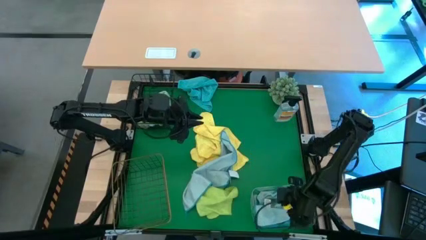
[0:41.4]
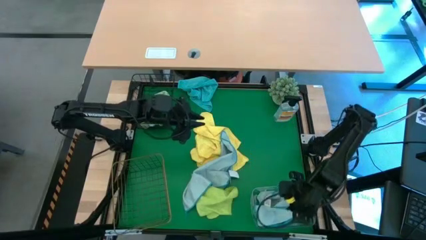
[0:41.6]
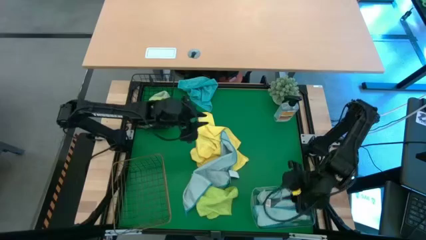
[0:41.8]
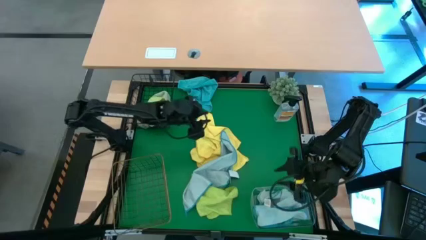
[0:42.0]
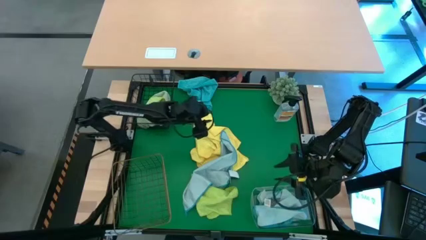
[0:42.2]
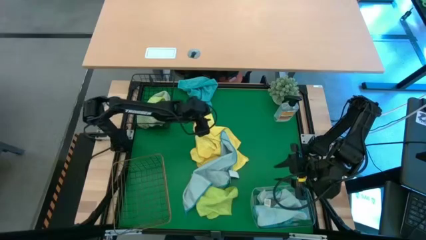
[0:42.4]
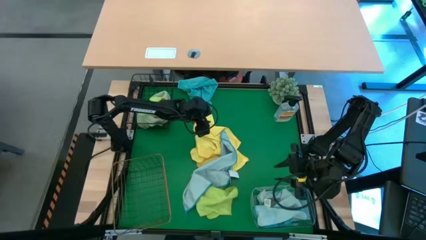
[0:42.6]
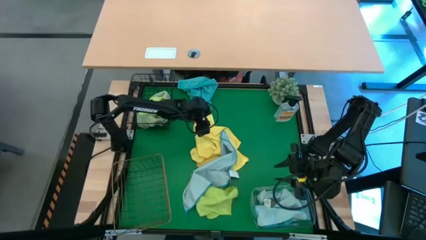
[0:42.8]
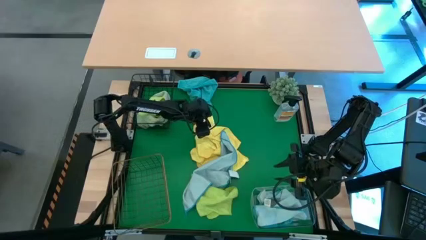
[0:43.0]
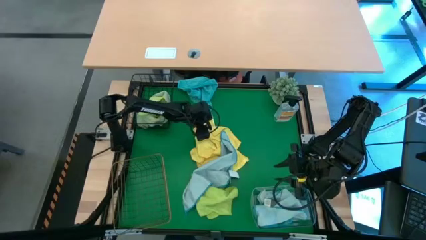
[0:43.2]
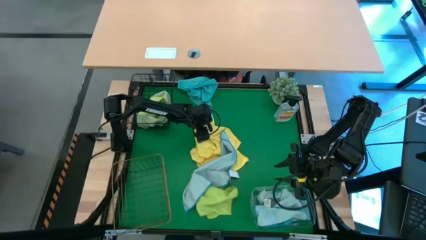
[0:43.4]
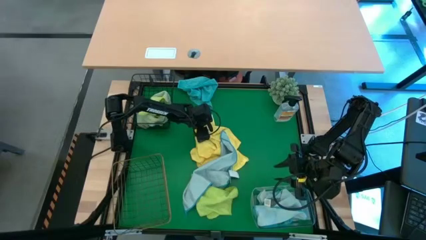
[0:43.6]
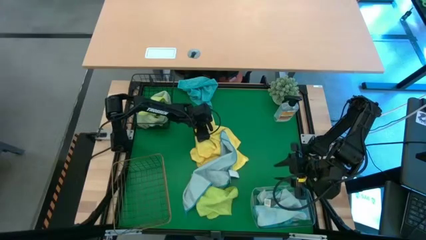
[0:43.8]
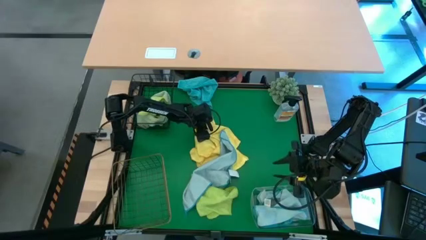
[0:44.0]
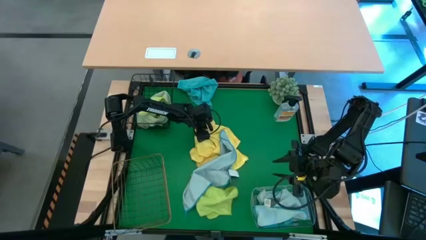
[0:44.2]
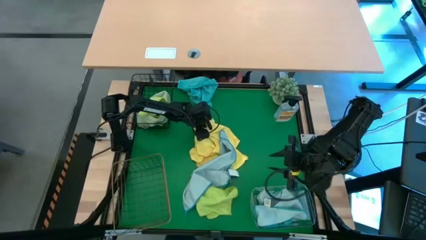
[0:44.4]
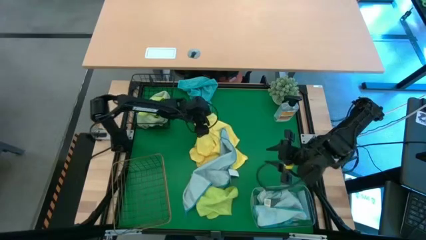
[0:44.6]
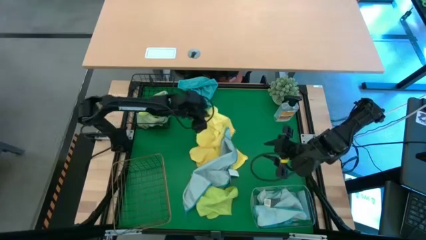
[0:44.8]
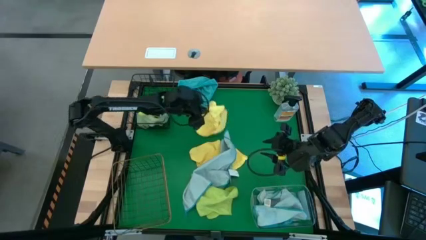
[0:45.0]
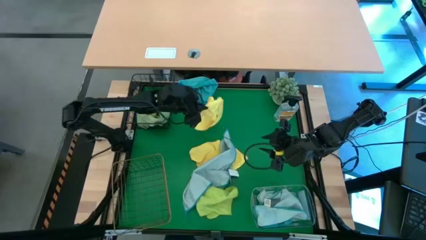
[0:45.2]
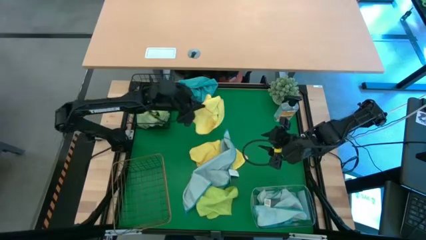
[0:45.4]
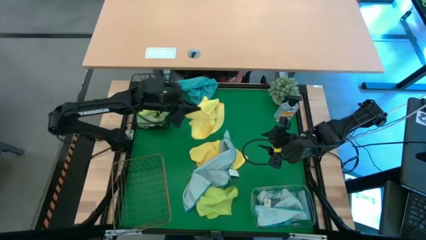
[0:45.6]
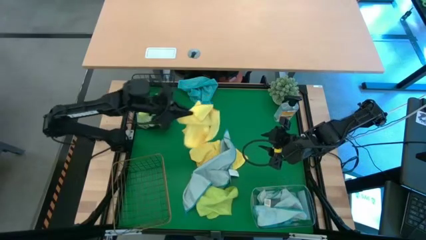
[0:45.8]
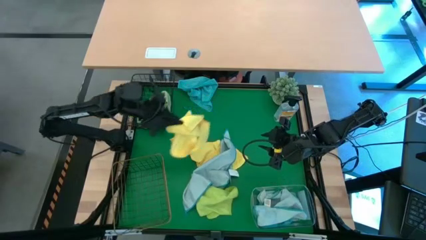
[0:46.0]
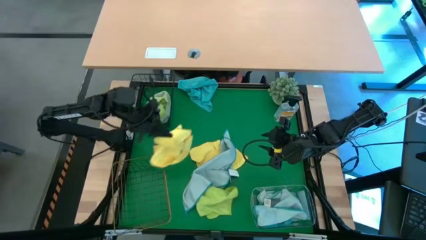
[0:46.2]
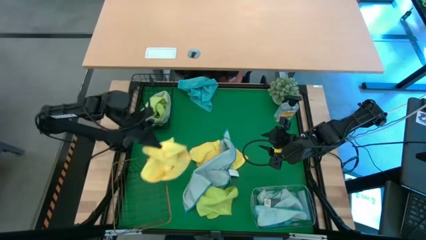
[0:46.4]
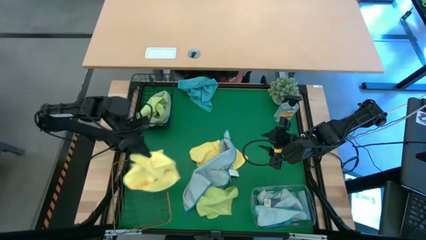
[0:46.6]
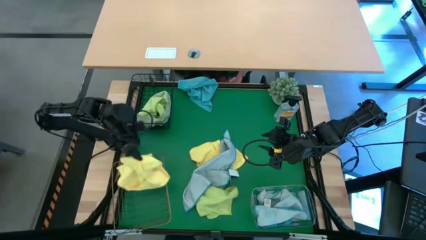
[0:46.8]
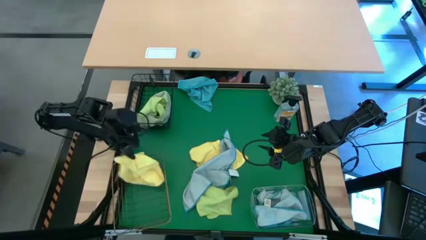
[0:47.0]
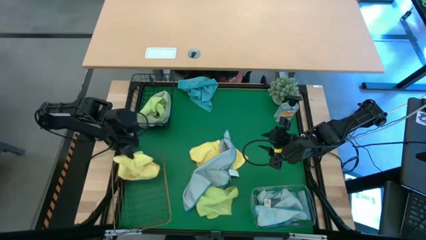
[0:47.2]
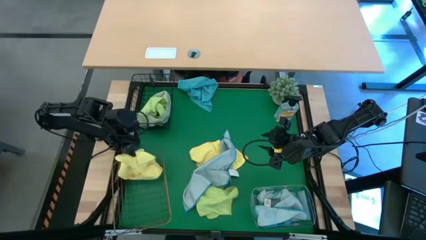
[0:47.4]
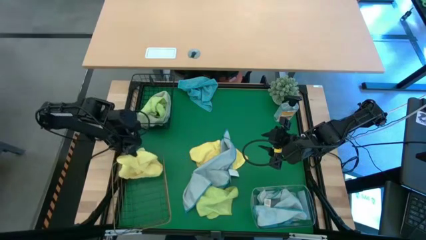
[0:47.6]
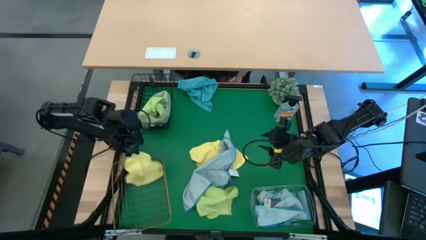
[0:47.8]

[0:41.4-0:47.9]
Task: Sort microfiber towel by color & place in baskets
Put the top yellow microfiber cloth into the gold wire basket

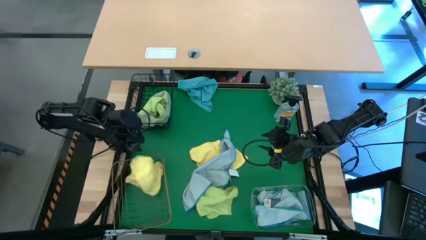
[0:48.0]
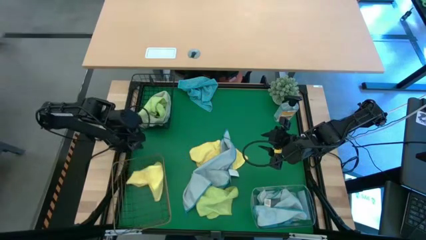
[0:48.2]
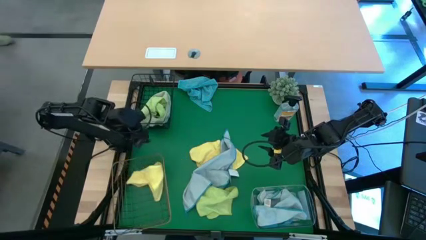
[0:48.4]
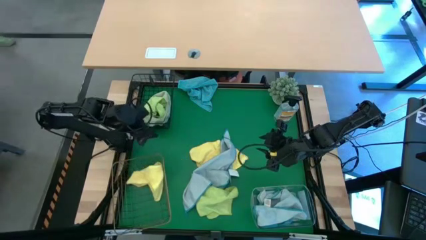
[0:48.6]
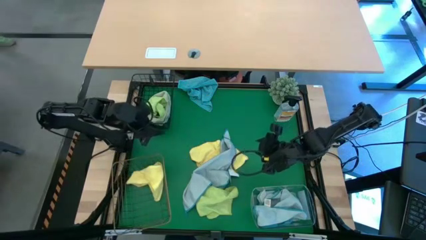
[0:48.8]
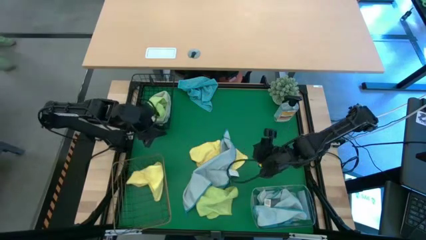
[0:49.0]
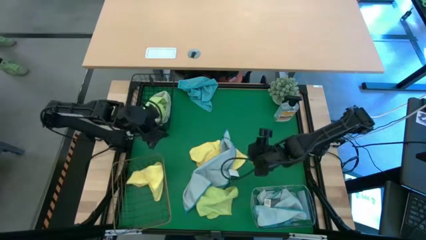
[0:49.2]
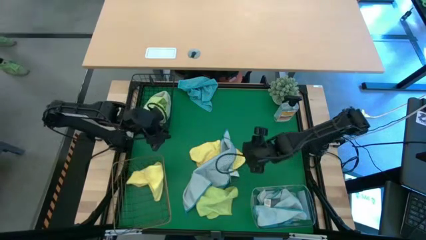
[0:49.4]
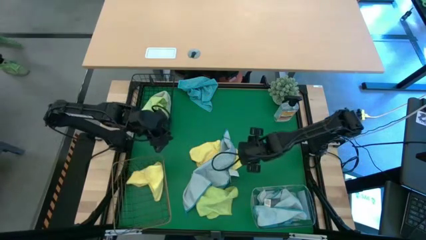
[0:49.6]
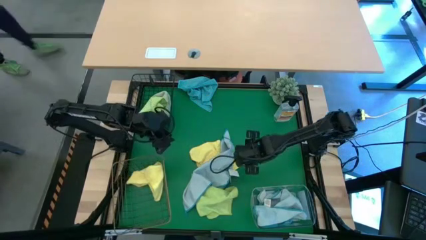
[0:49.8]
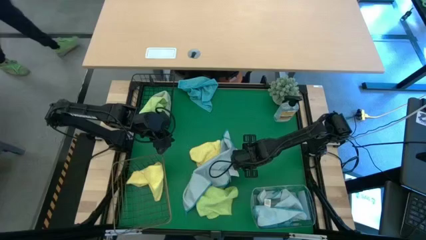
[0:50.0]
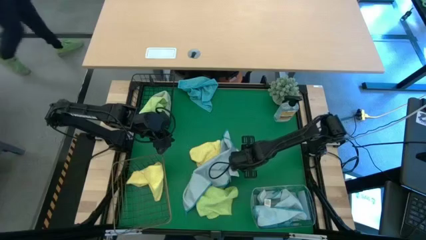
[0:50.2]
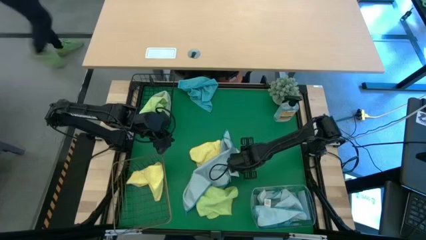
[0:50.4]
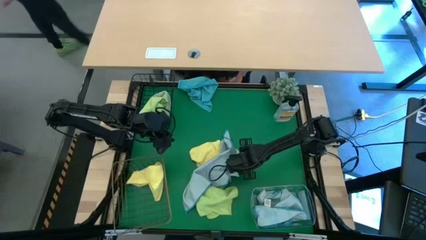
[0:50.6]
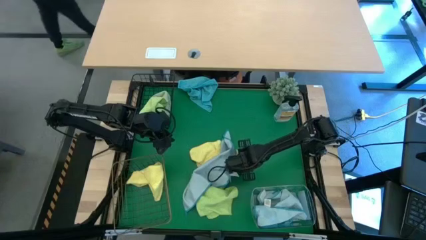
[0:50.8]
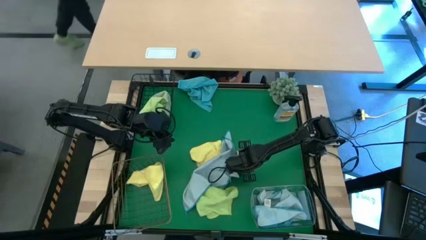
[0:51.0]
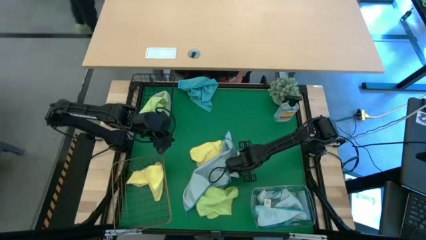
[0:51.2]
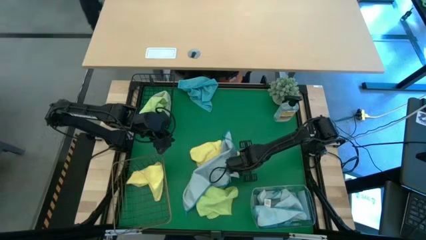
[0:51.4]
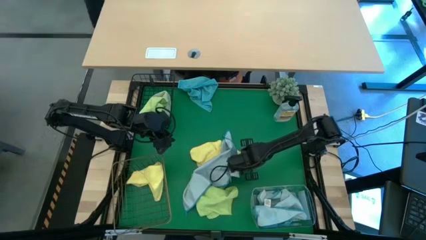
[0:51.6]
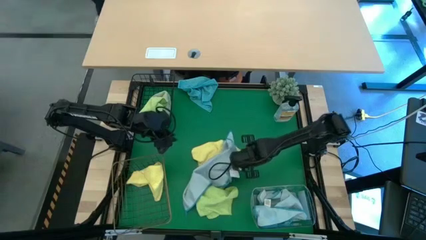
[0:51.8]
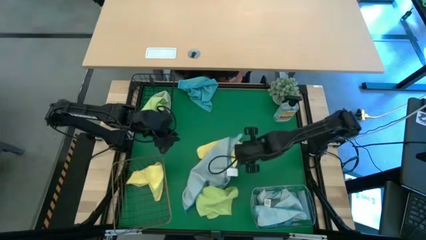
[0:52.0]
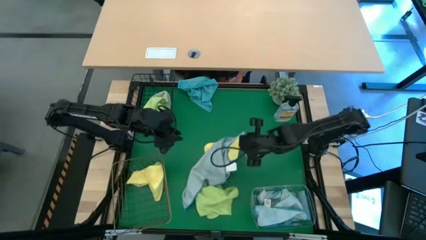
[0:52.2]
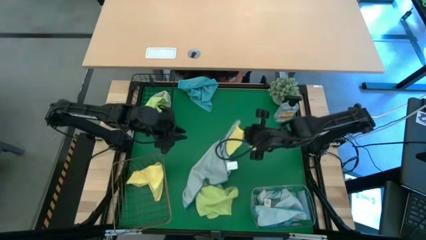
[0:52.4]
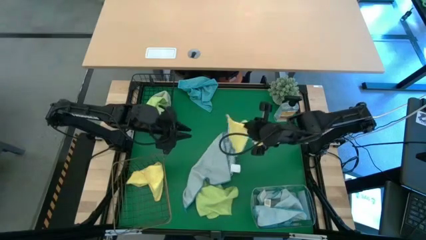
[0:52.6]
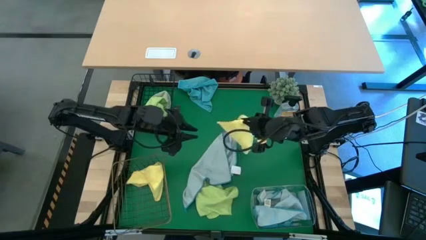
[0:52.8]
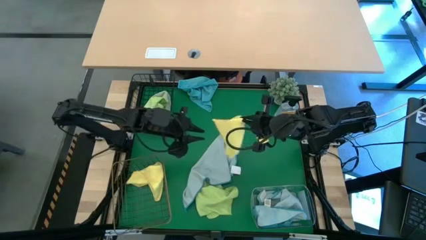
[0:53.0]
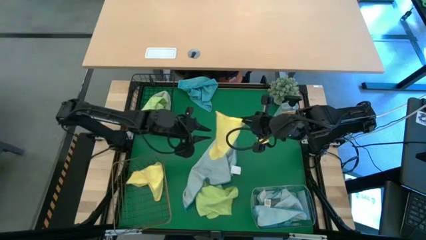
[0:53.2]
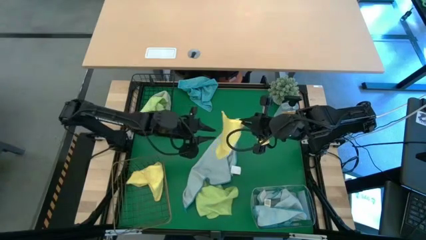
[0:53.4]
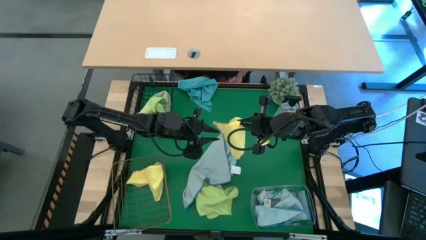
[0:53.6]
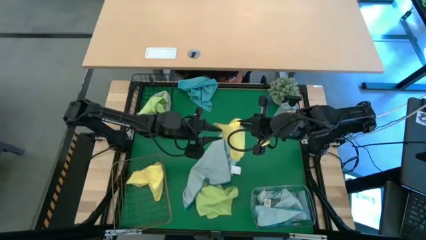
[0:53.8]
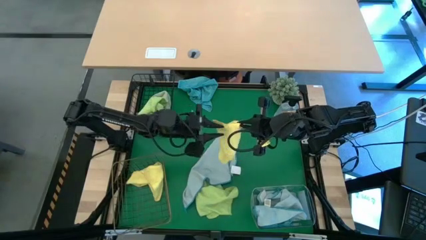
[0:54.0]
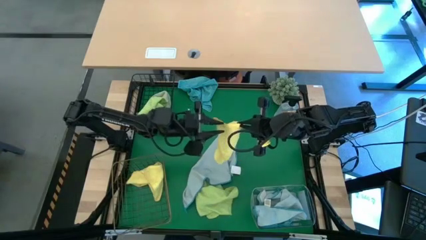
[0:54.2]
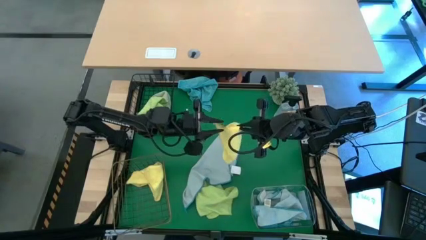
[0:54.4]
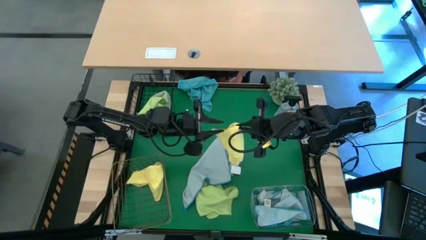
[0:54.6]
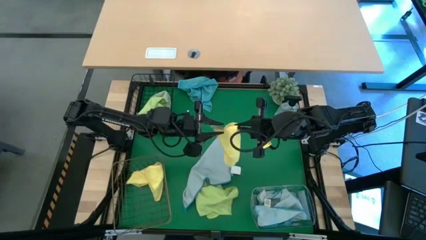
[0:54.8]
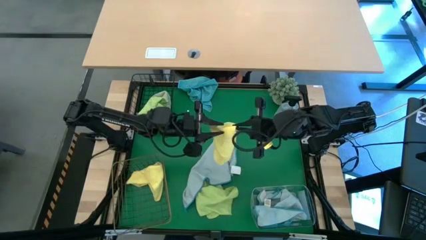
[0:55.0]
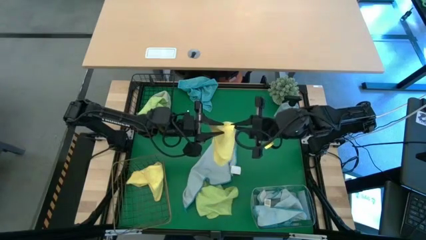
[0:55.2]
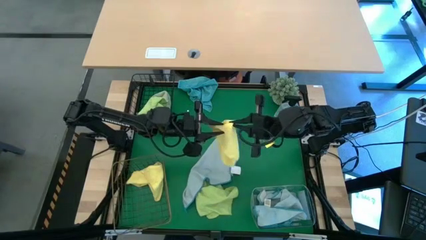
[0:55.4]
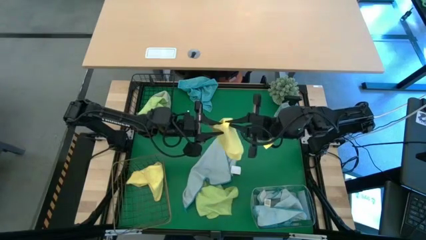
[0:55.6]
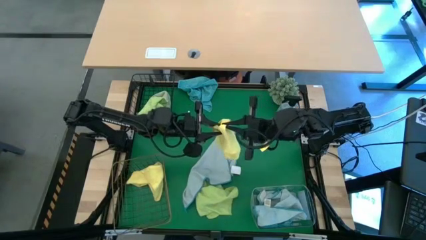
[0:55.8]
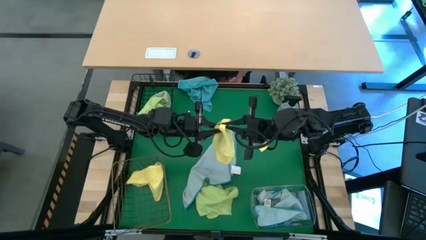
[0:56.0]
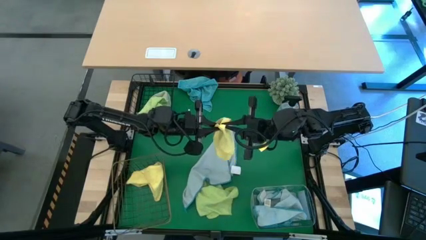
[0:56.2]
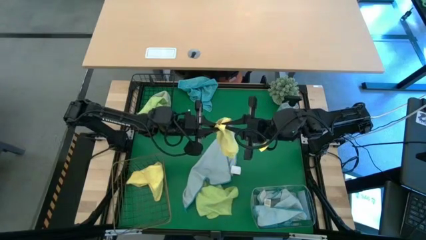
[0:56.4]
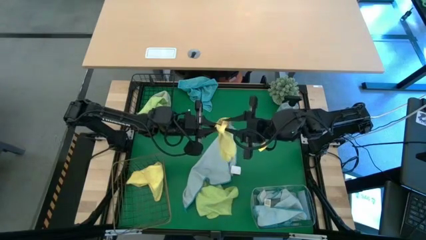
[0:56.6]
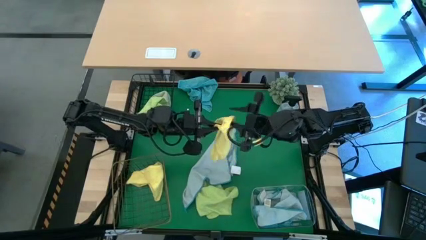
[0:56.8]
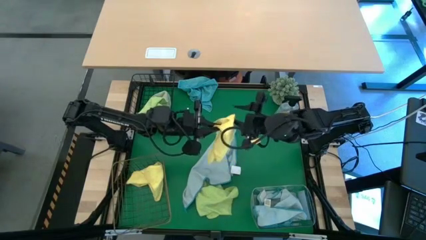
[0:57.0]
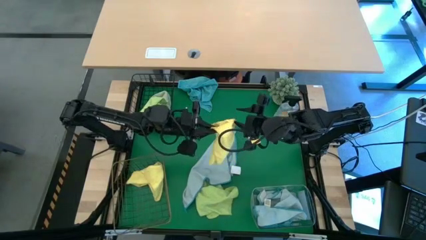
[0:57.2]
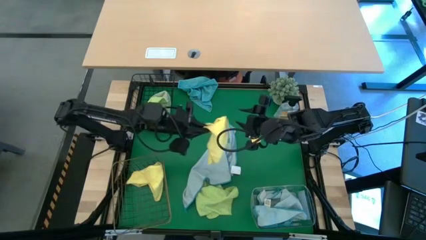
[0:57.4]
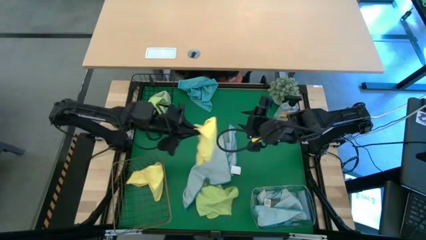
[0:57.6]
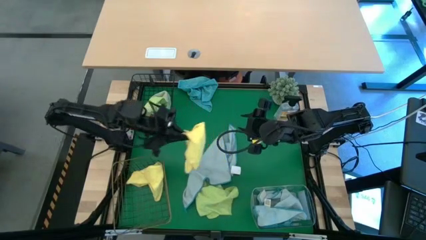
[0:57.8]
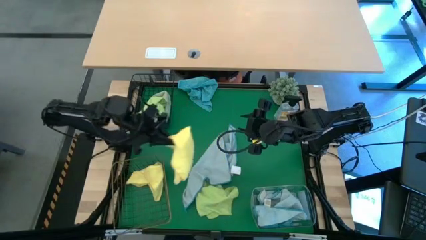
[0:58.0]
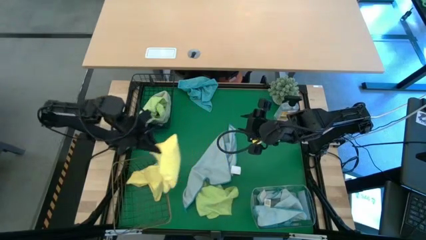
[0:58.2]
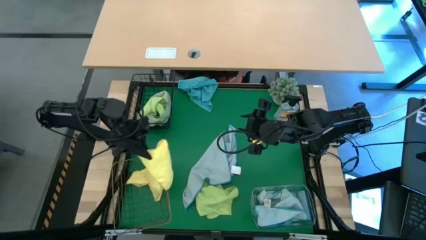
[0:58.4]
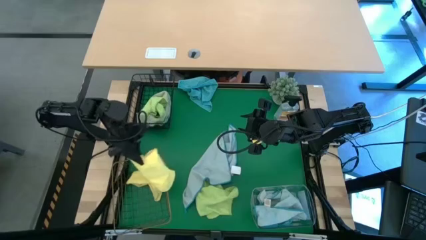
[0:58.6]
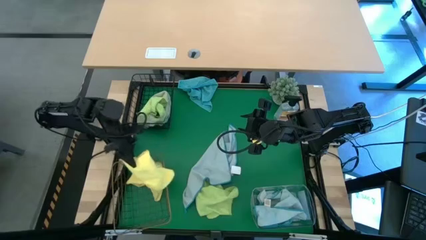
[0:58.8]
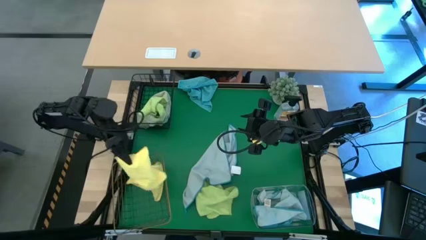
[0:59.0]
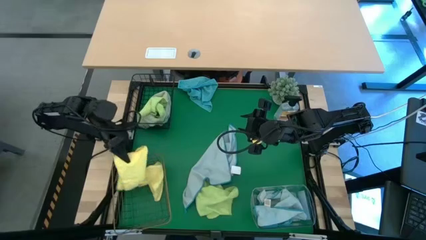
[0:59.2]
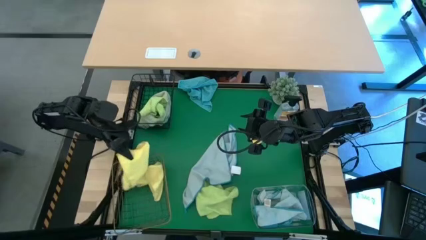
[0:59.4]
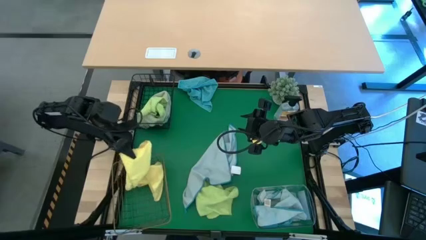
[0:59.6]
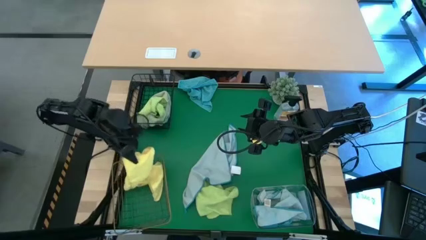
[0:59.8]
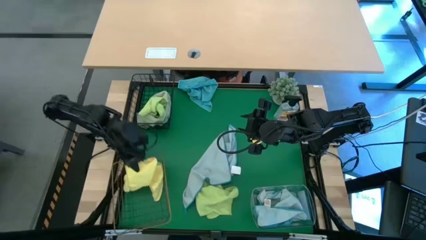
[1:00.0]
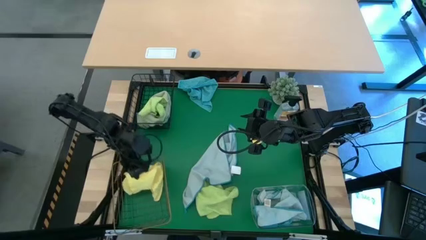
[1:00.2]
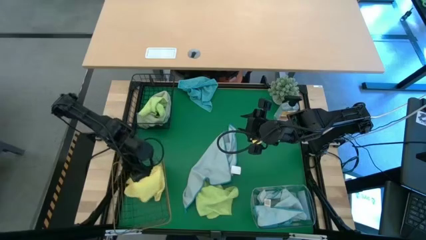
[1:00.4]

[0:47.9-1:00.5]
Put the yellow microfiber cloth into the gold wire basket
